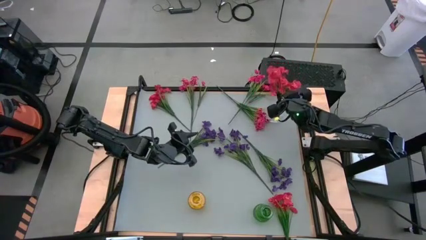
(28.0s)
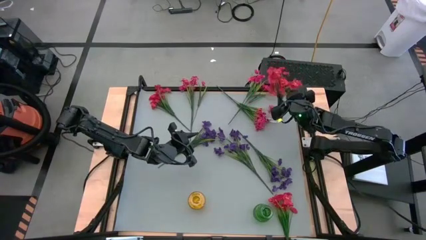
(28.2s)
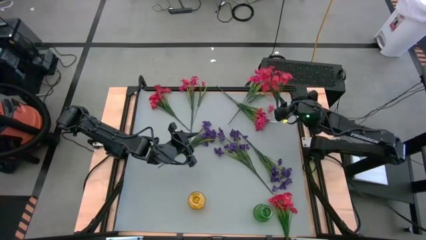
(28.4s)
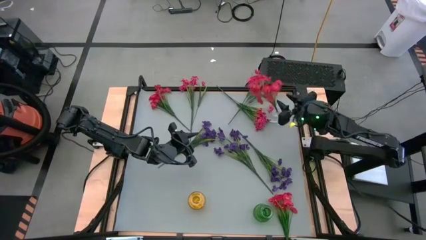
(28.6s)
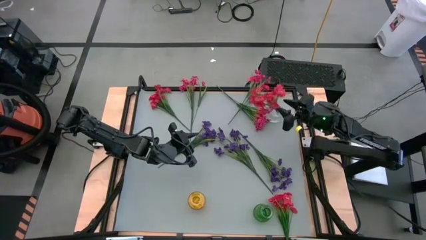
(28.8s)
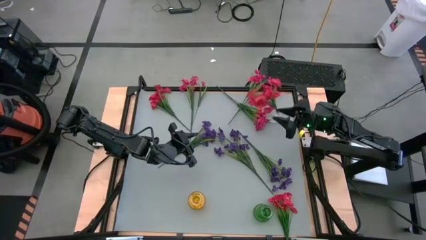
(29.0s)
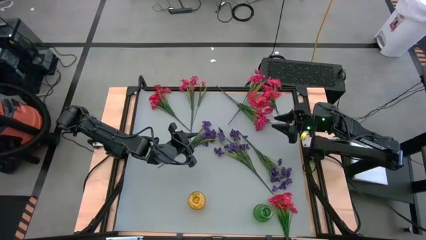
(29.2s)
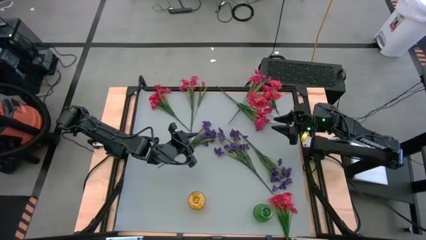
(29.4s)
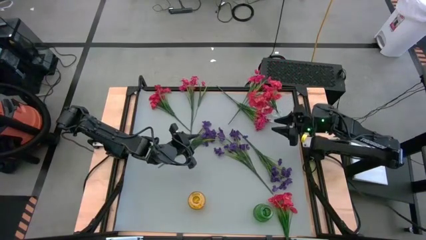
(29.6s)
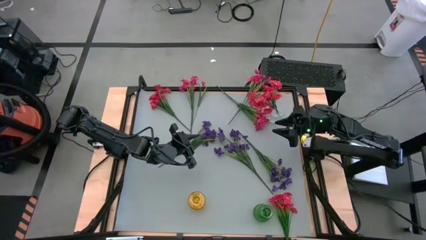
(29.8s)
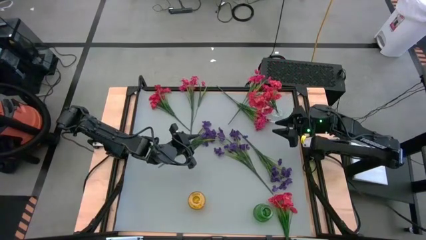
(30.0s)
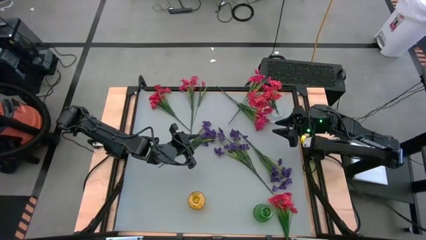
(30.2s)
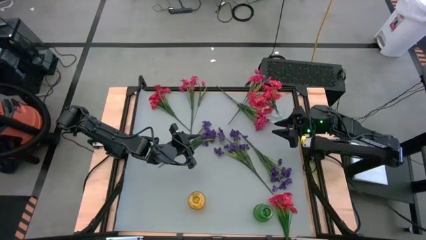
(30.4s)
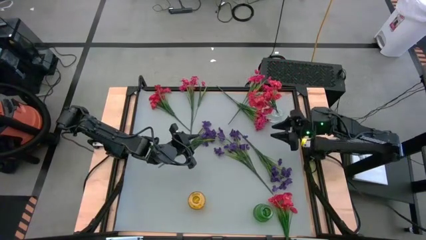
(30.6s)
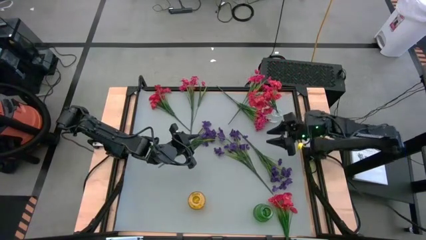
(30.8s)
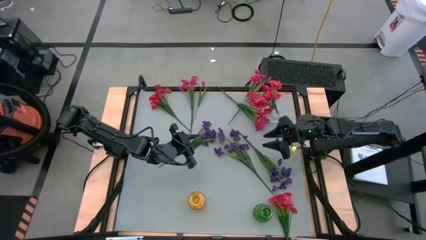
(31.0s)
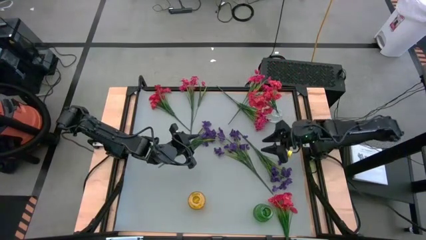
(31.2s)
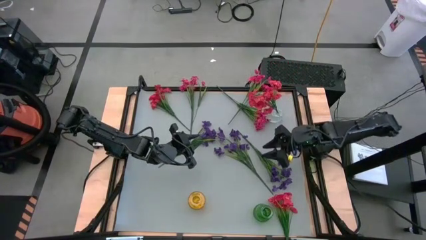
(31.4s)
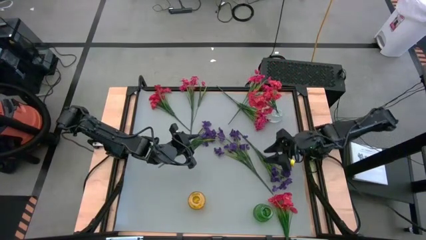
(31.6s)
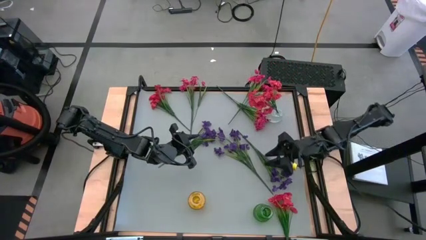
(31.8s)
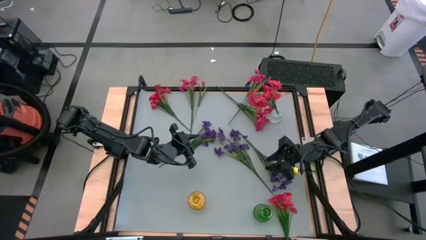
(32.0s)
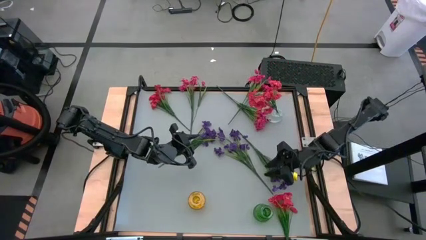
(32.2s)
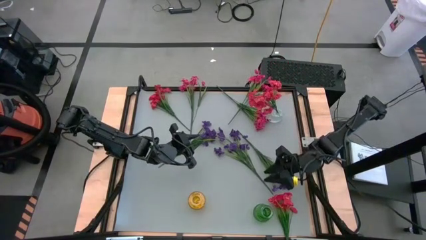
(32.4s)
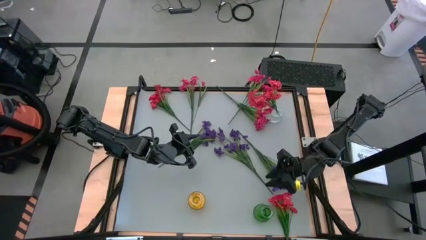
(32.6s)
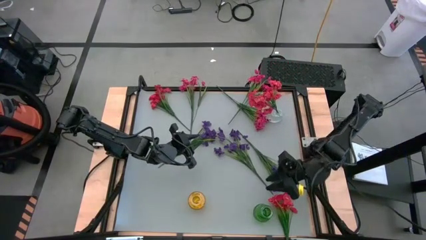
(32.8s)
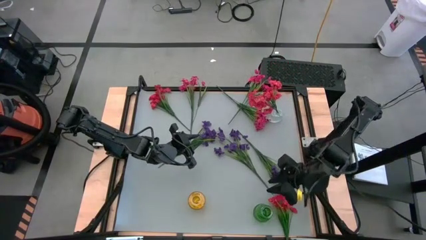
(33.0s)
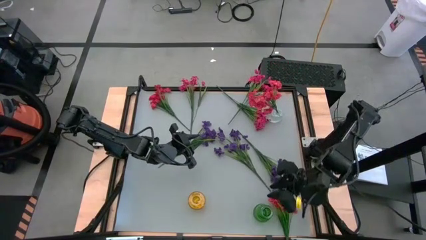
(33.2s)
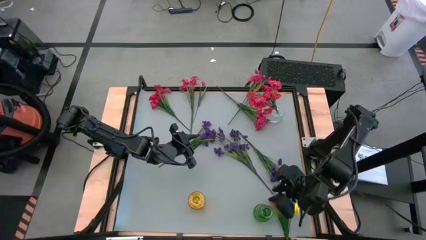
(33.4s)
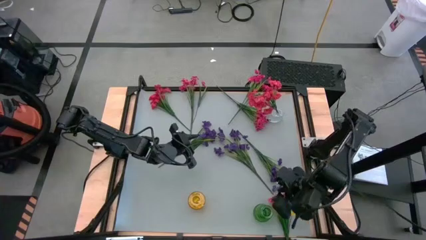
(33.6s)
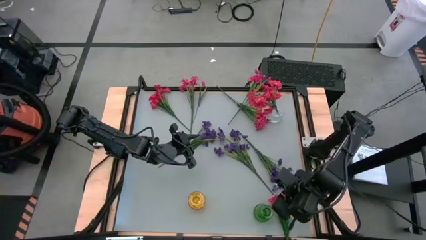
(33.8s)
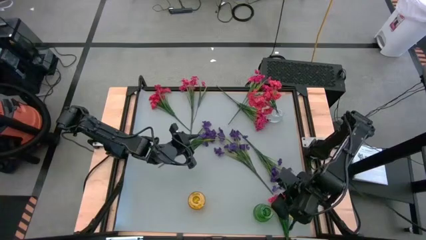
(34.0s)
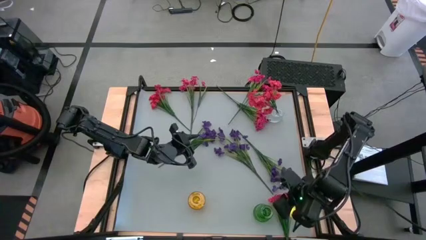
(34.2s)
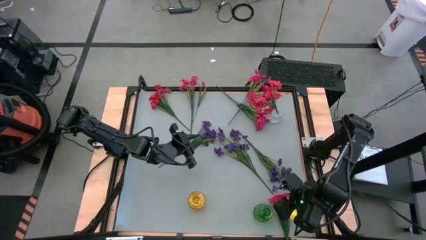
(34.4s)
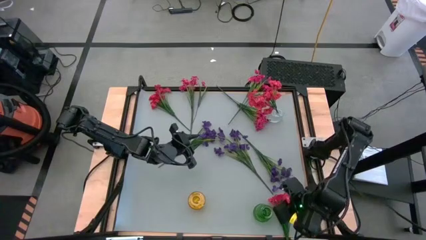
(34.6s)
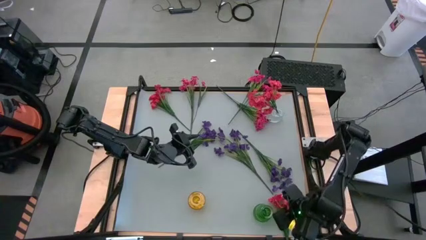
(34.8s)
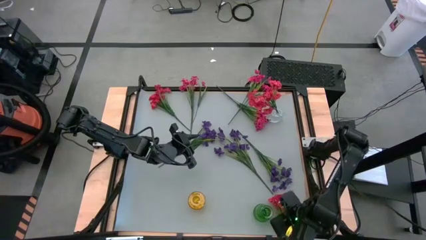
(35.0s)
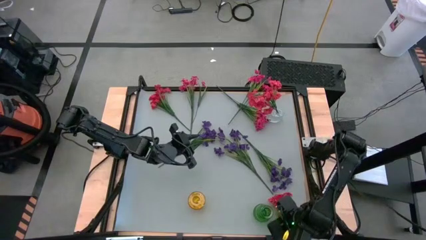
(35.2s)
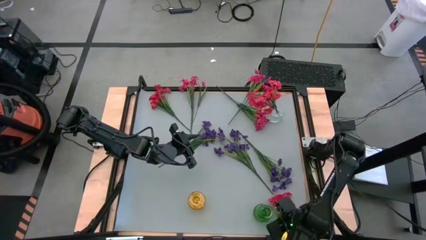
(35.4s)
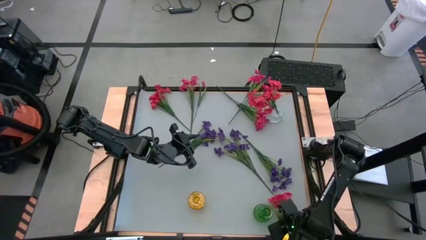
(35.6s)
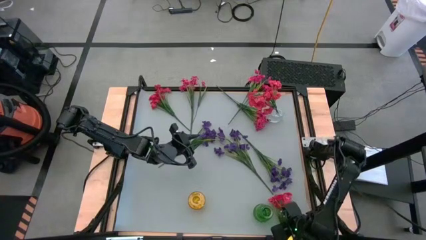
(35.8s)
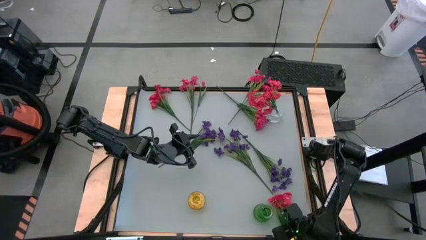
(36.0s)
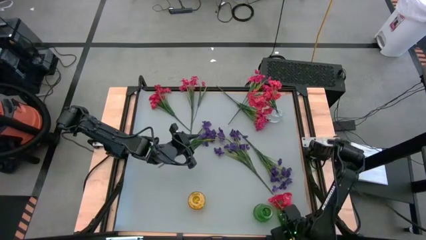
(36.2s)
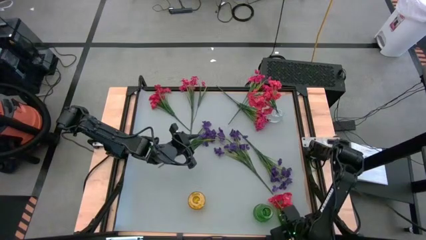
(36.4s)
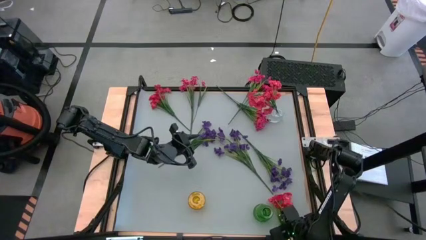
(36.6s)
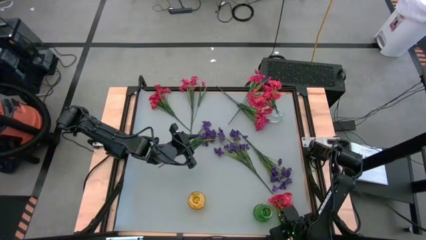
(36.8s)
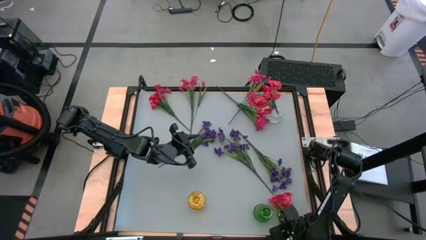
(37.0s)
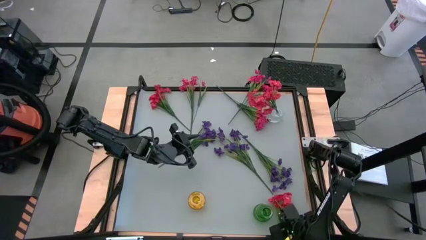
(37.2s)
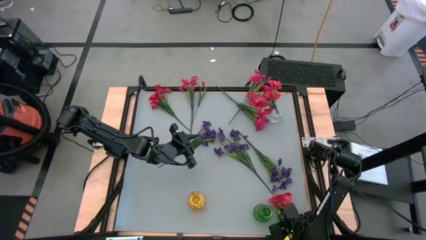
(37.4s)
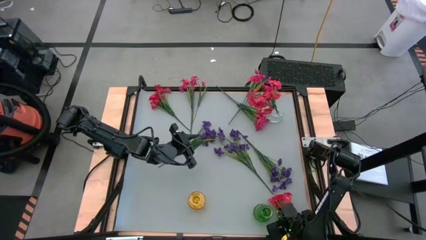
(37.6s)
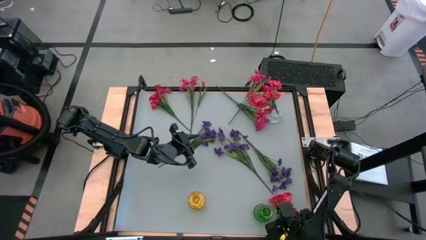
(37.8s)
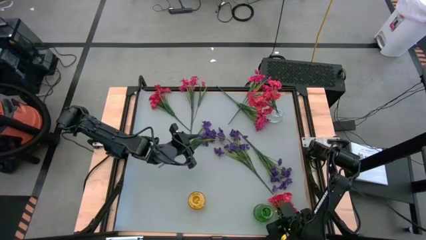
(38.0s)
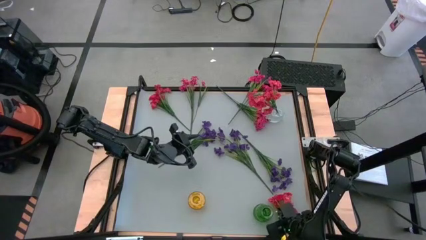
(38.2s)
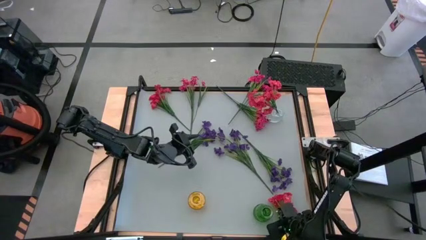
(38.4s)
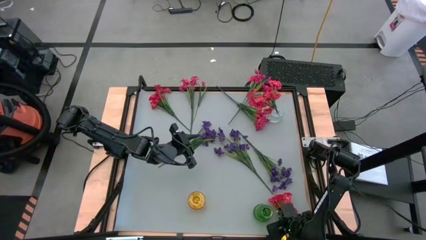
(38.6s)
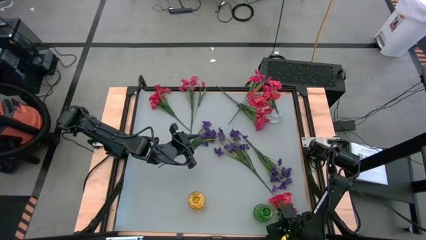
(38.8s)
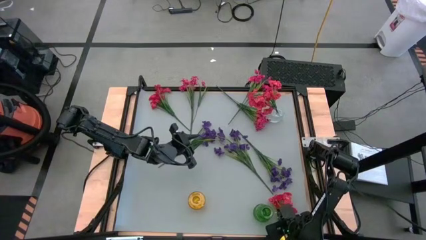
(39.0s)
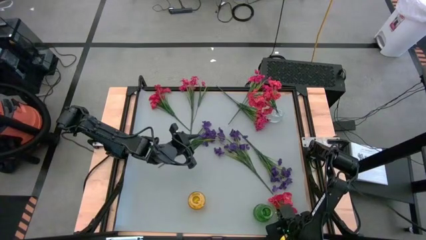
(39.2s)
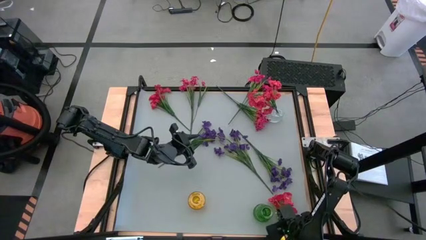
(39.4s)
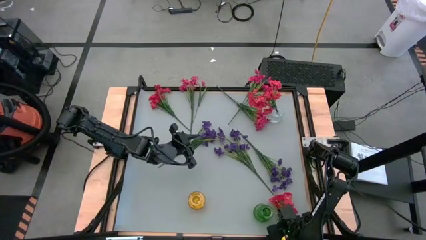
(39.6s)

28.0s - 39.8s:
Task: Sort flowers into vase by color
Put the bottom red flower into the transparent vase

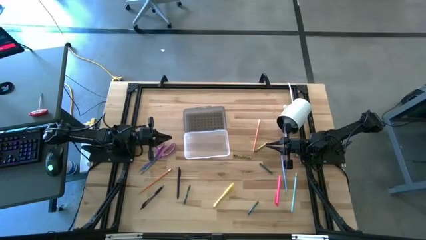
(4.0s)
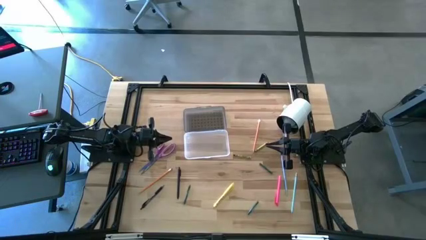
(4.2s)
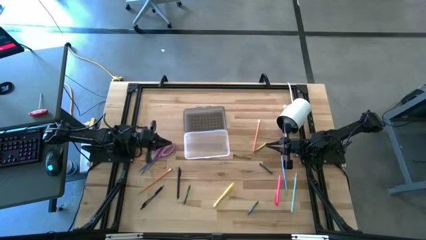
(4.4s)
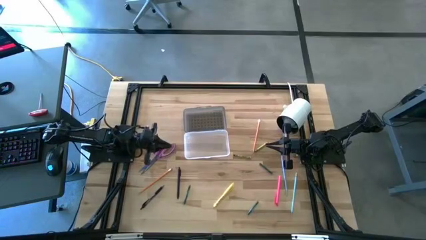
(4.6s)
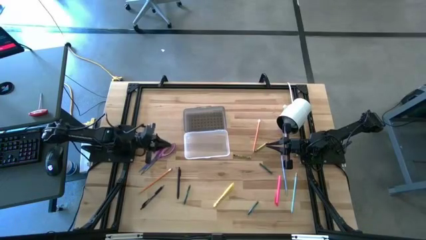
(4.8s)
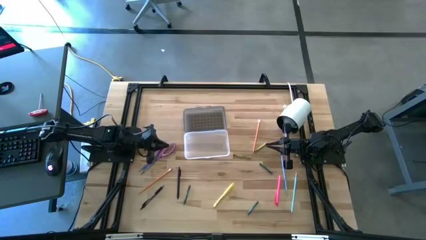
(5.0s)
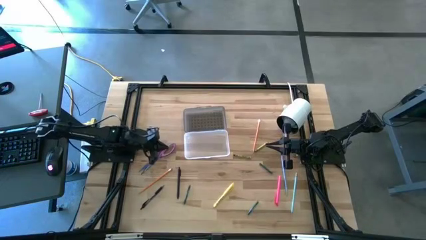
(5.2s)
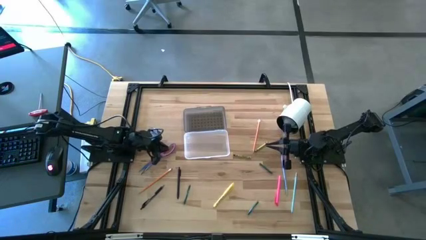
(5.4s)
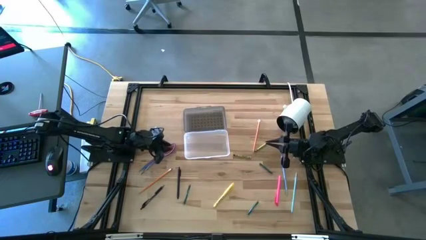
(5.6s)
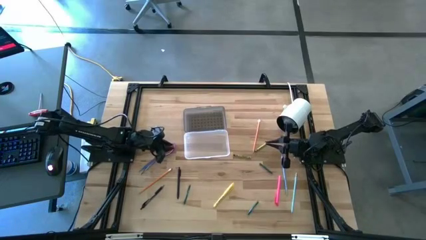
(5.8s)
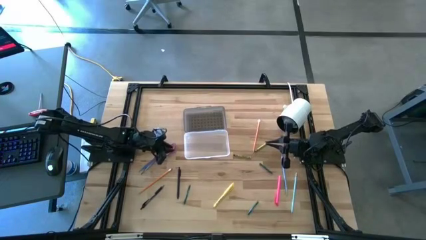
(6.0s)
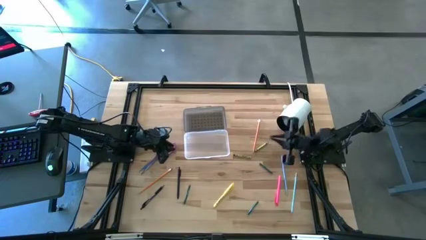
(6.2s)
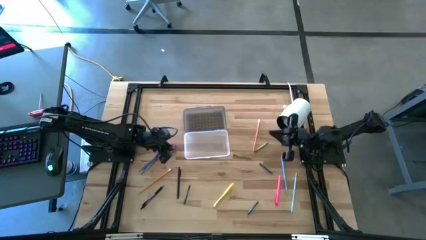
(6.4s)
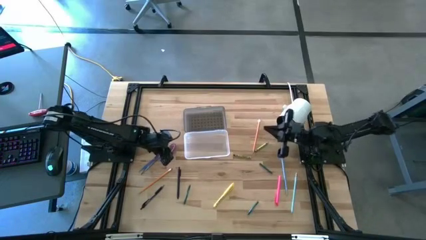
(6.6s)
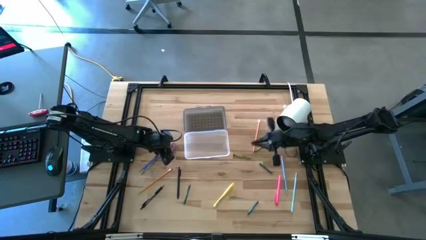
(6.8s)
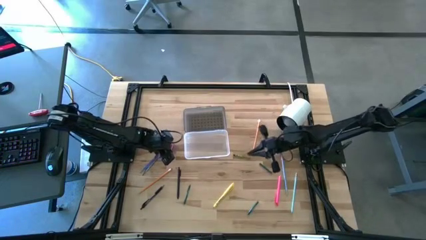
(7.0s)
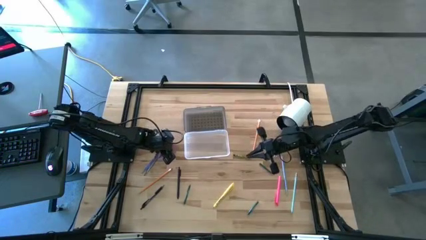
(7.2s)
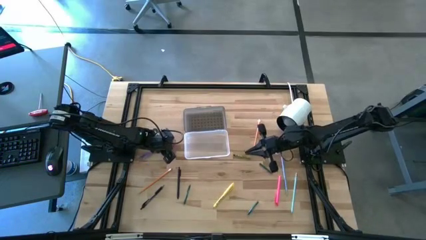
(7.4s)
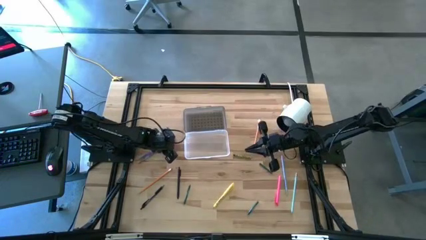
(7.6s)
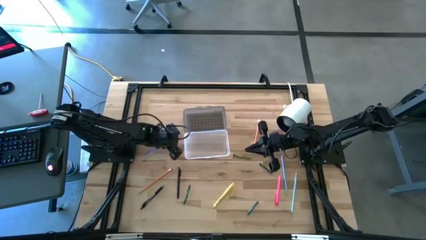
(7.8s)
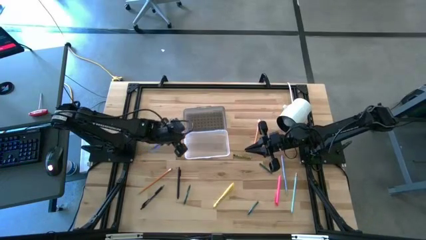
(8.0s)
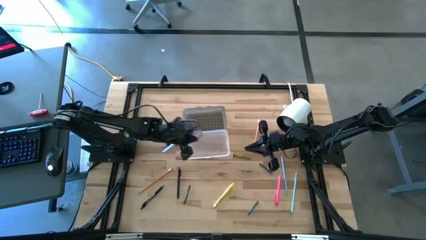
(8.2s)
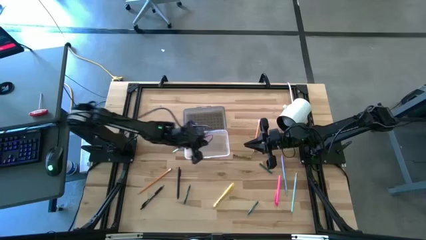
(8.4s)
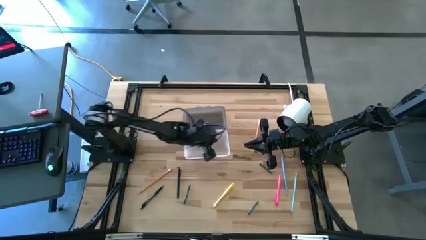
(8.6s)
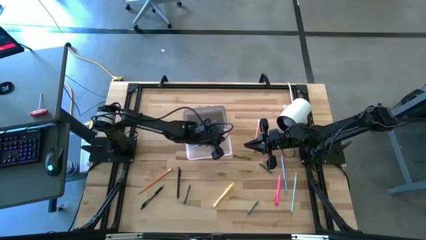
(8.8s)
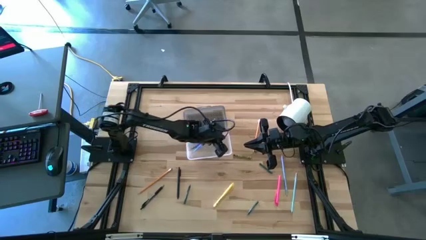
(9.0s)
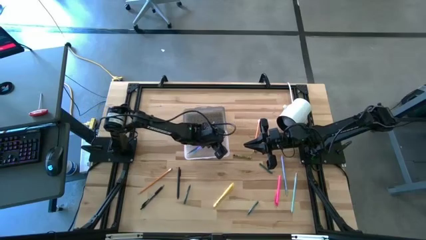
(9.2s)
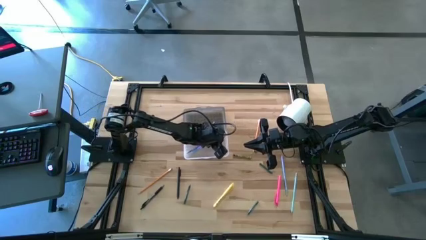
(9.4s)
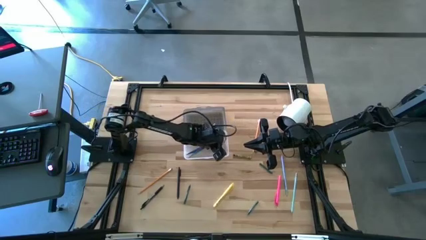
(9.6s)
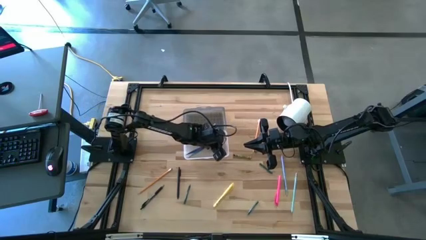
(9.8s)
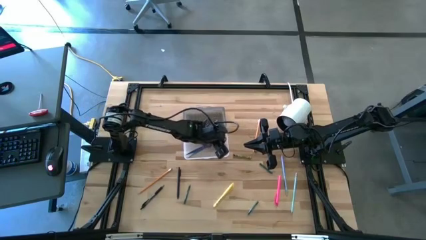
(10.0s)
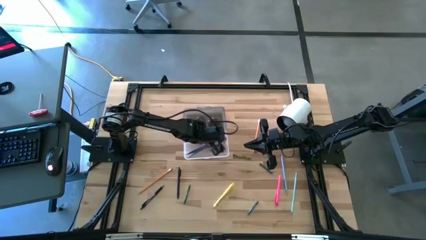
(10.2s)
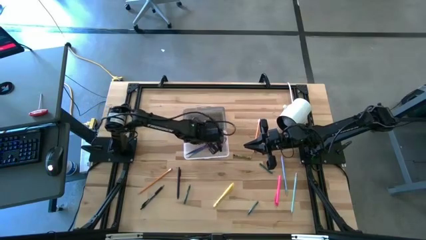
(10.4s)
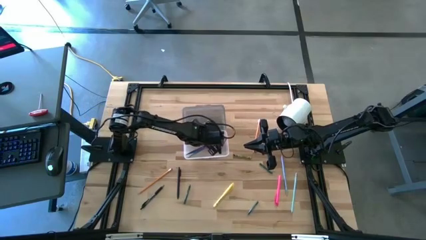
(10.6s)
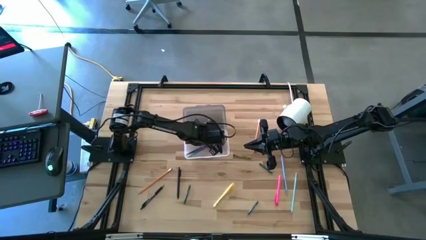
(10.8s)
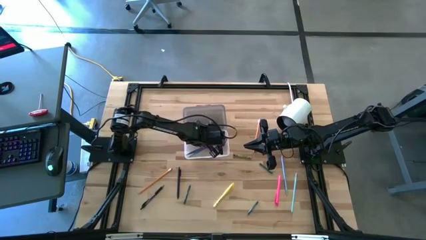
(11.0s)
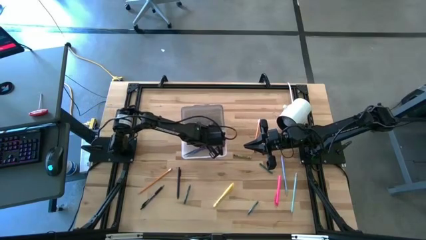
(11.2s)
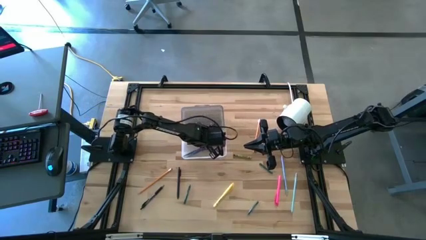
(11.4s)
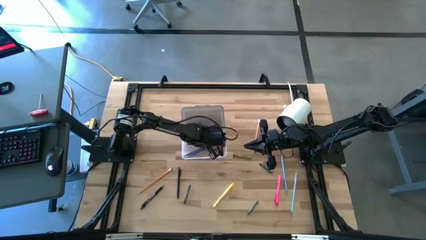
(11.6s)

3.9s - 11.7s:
Task: Pick & place school supplies into a supply box
Put the purple scissors into the black box
